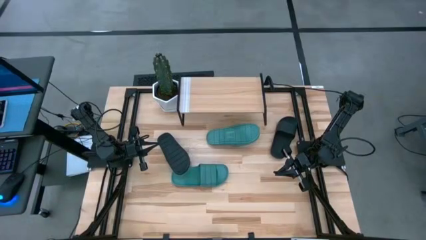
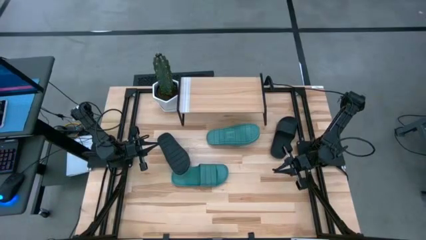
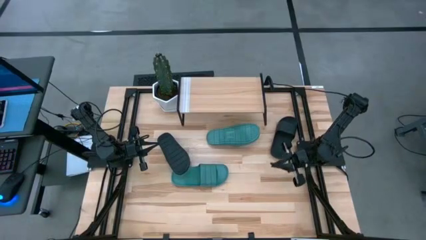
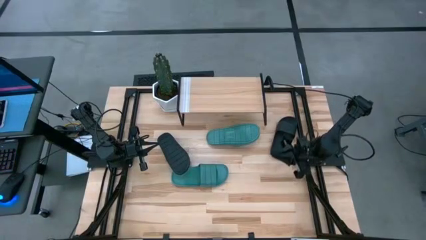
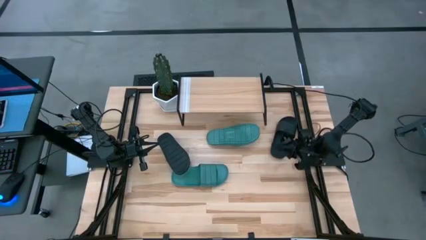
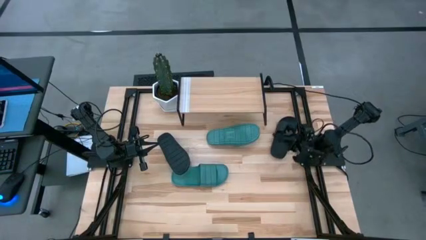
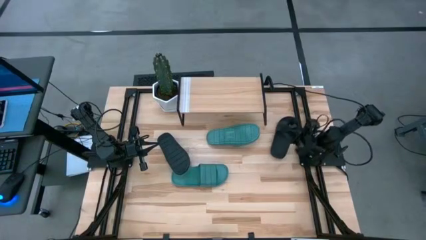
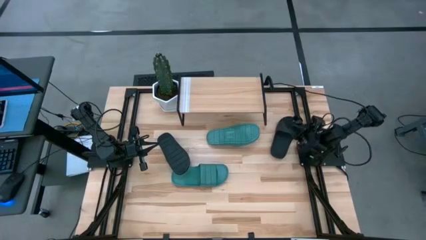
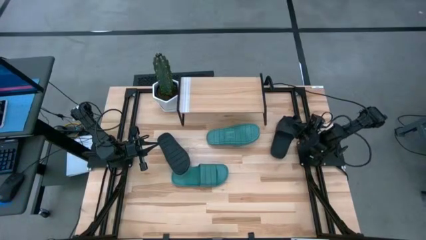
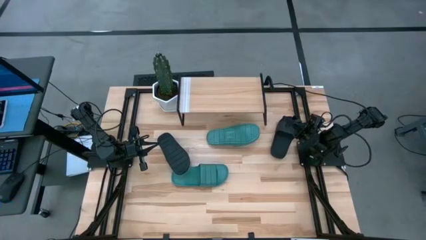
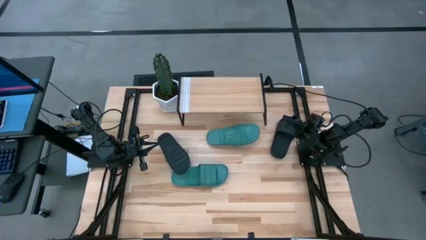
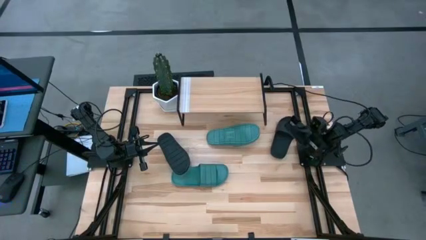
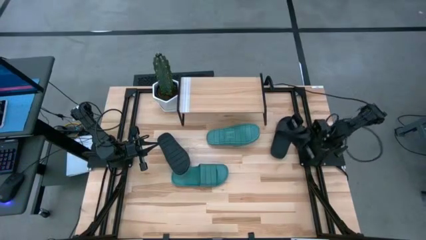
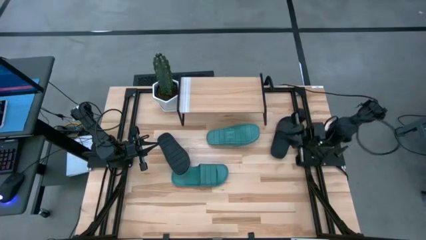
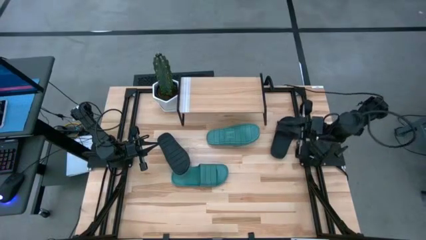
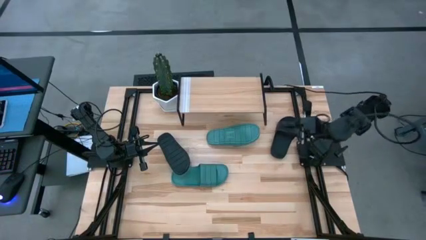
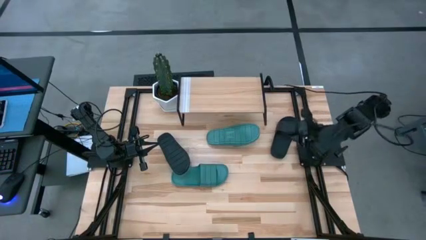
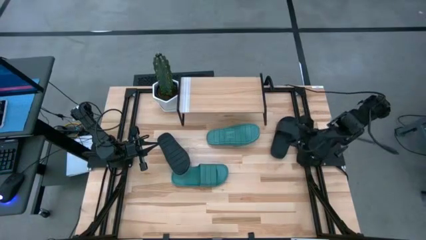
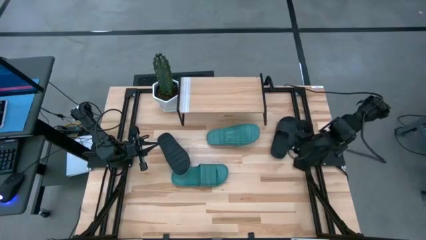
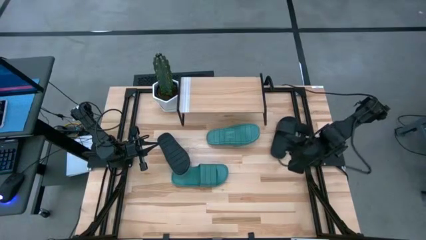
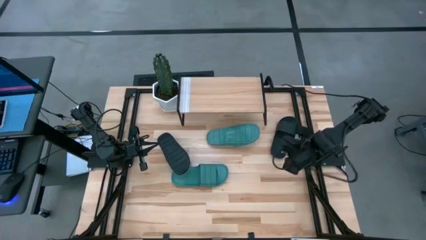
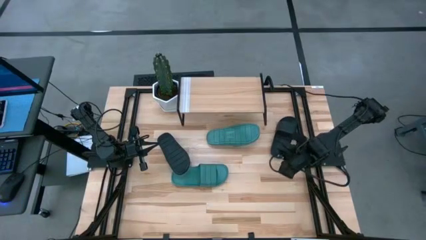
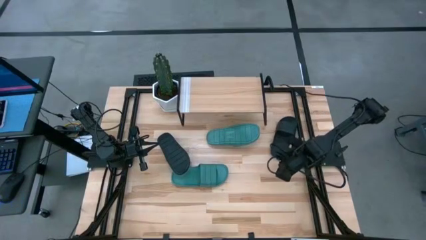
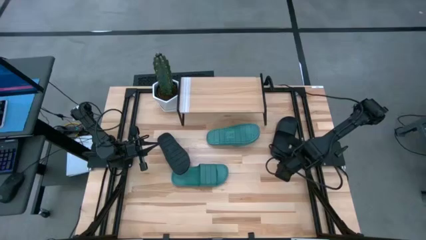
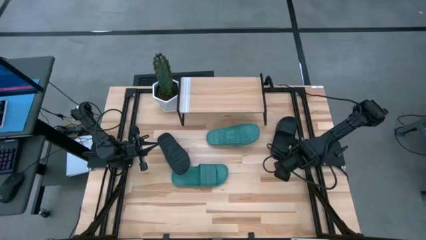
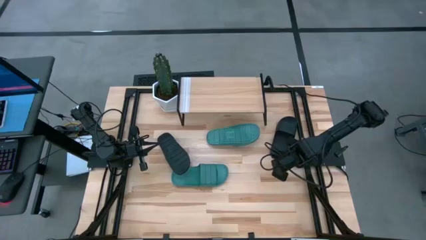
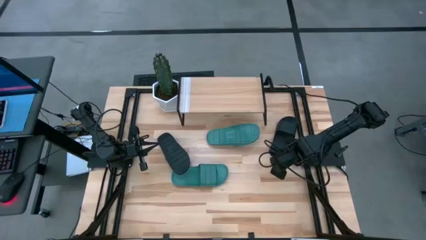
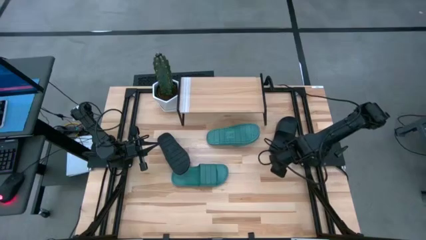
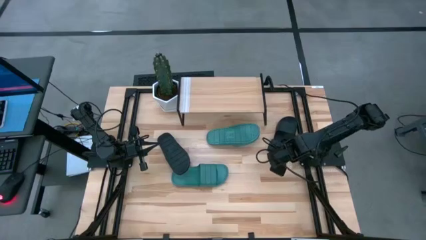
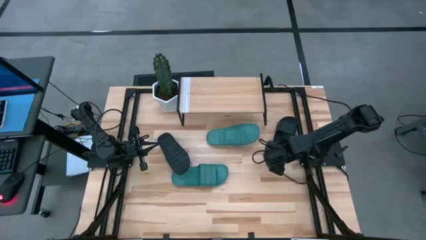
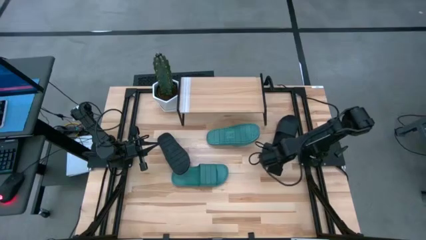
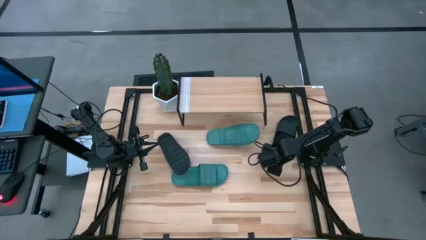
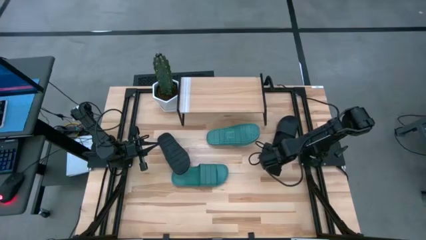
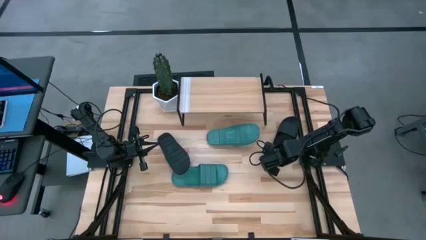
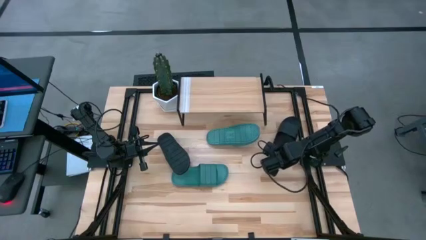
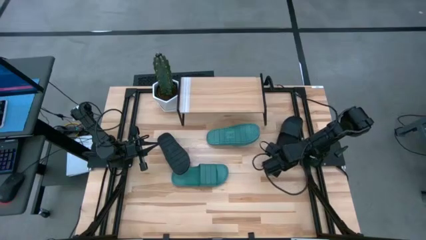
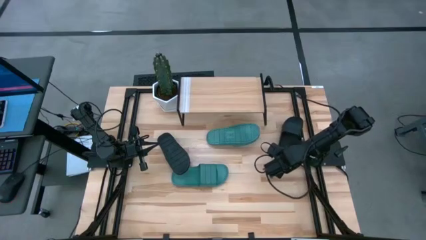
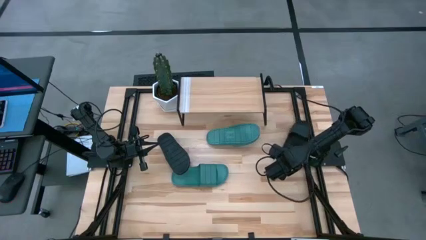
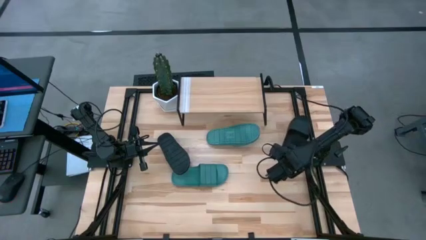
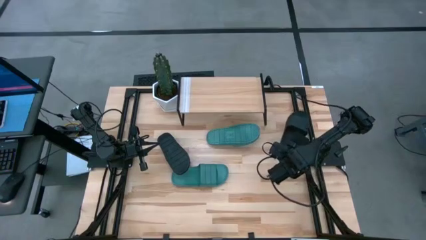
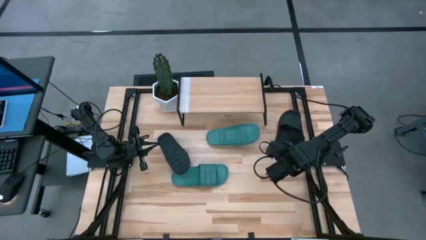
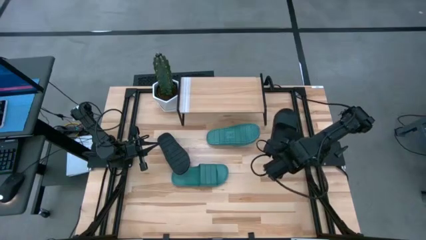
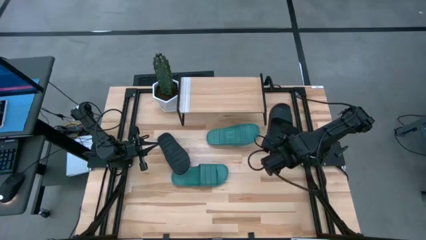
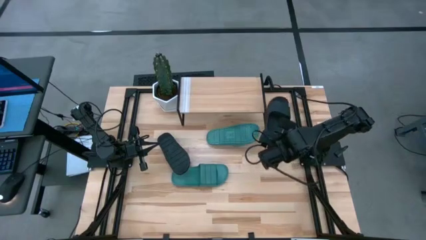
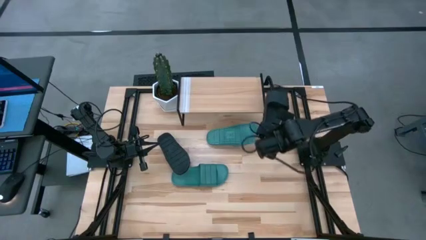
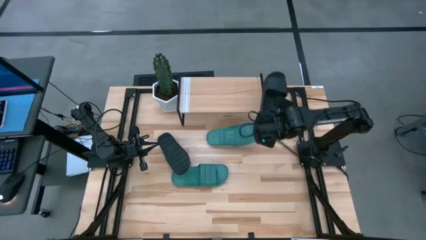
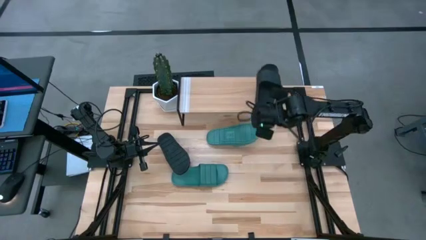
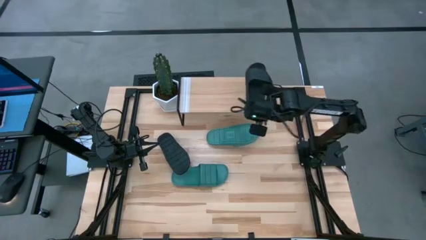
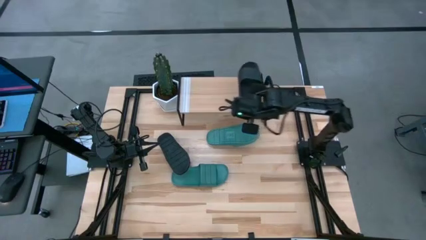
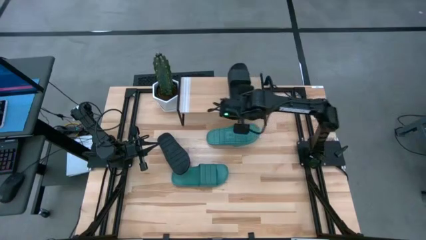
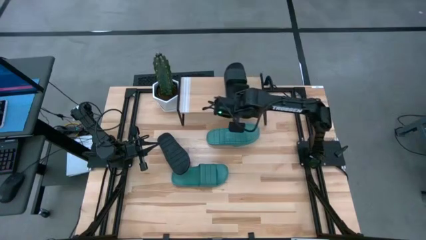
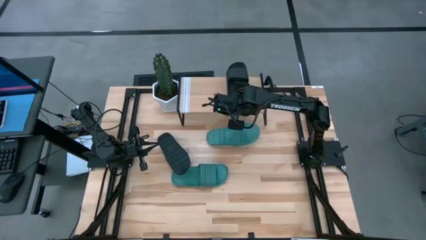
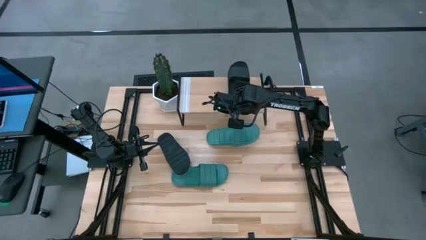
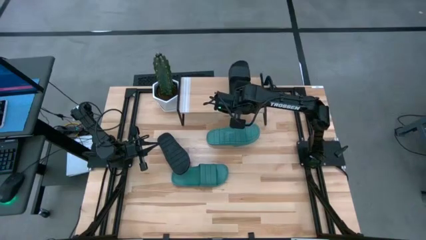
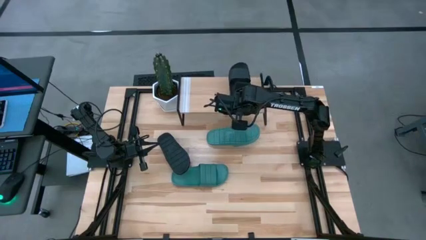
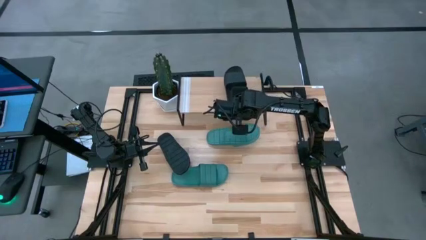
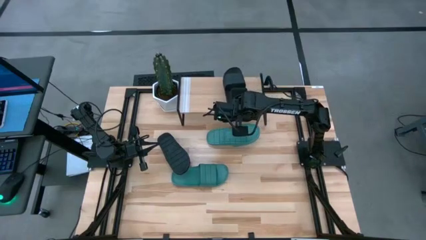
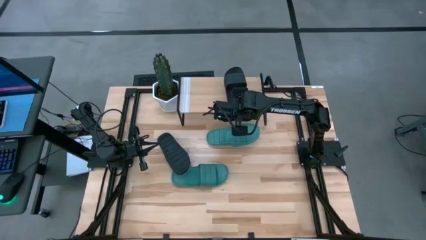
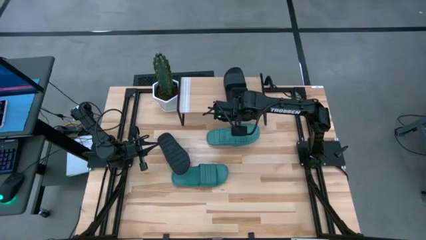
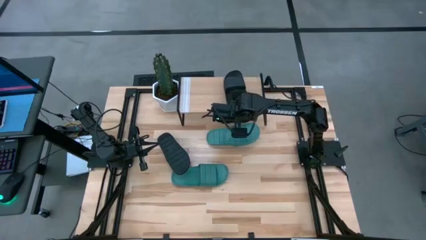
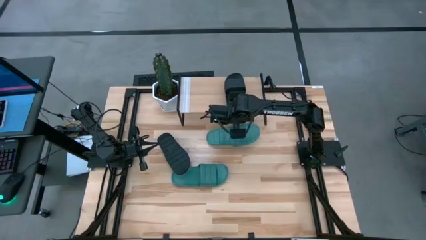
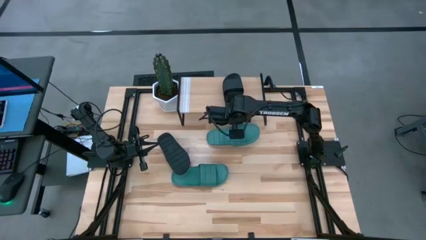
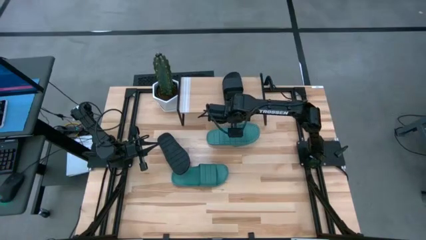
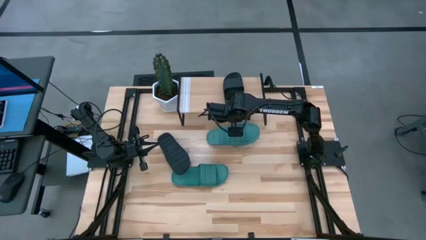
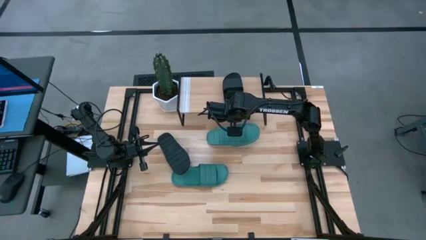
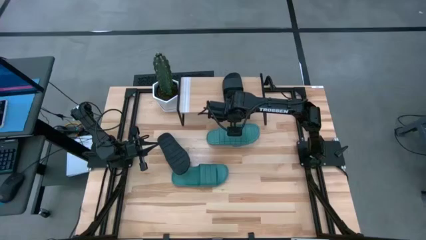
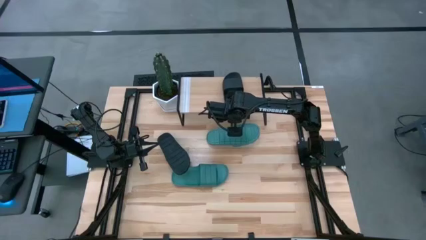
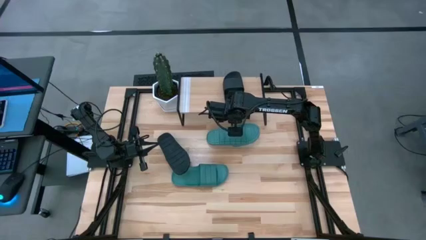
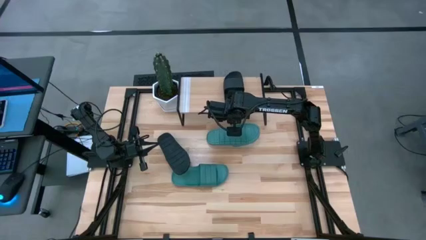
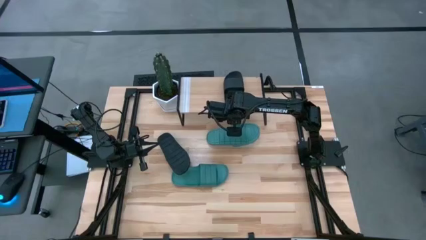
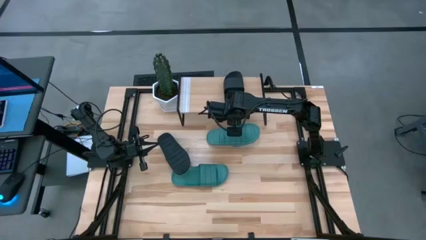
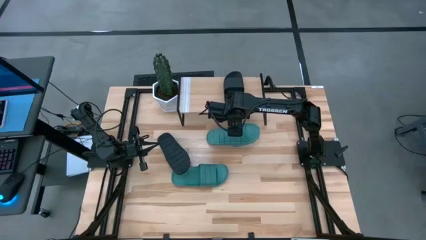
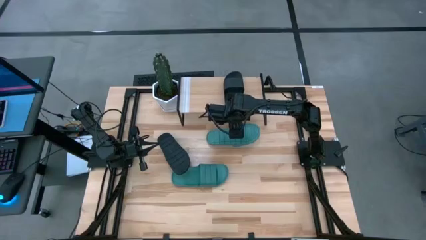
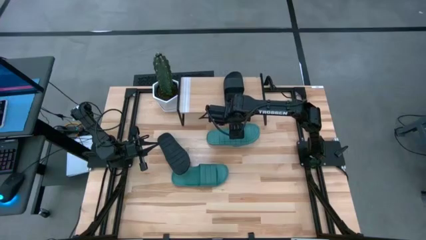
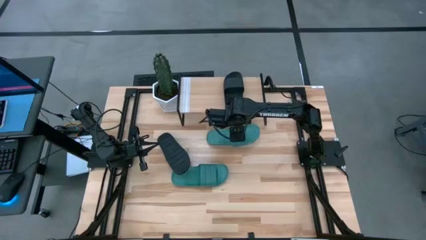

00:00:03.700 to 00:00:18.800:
Task: Pick and place slides into the shelf
Put the right black slipper on the shelf
